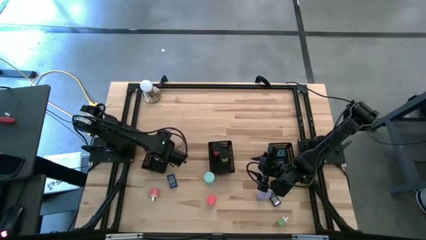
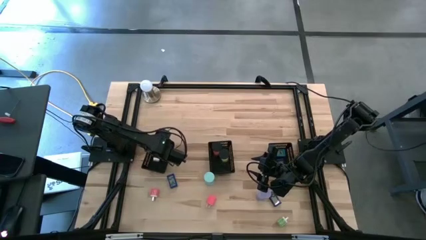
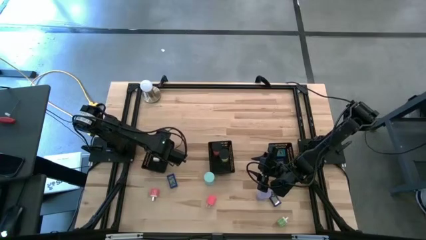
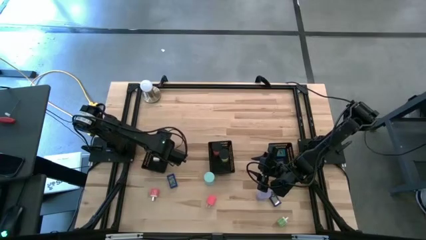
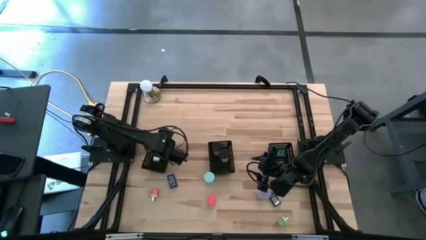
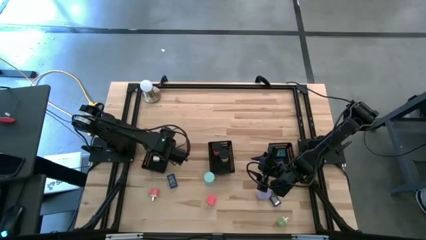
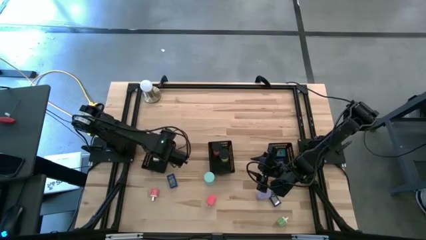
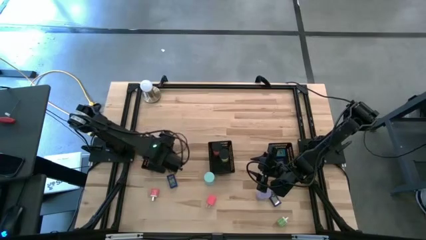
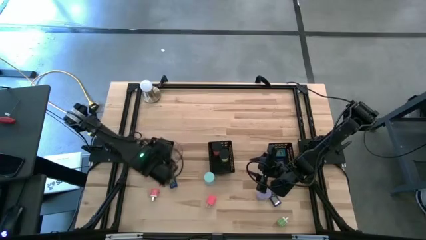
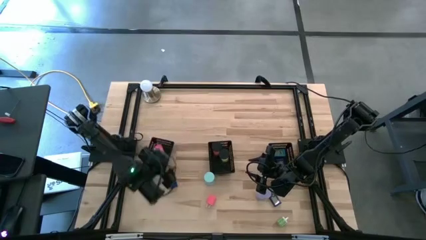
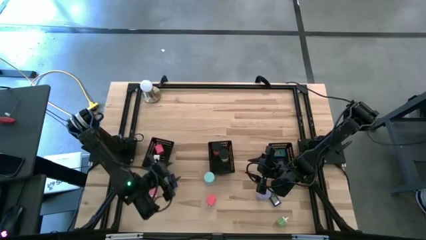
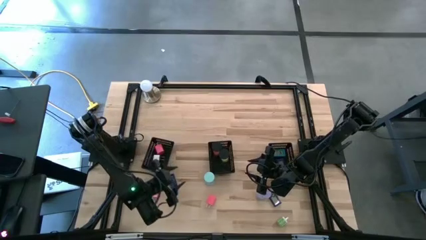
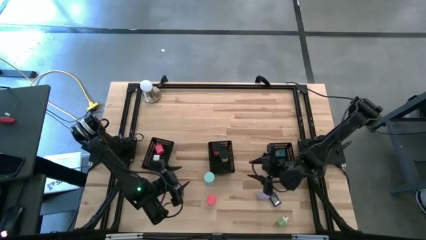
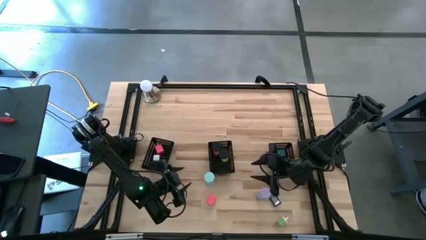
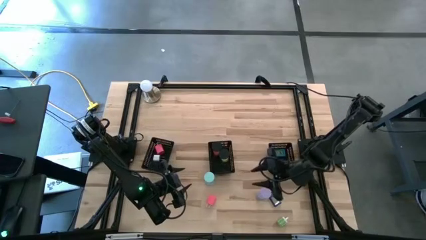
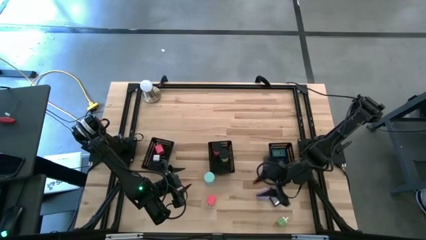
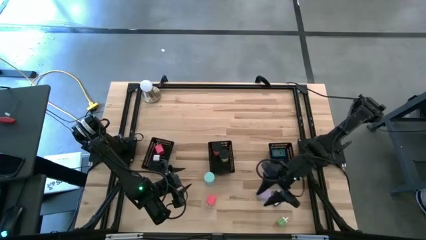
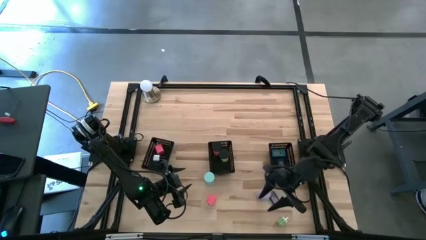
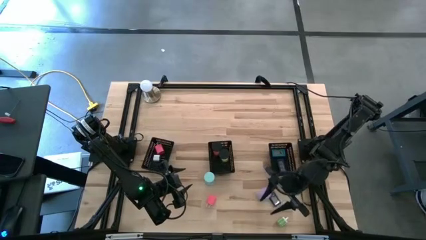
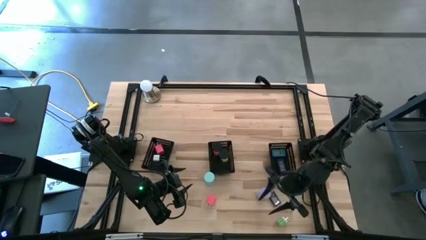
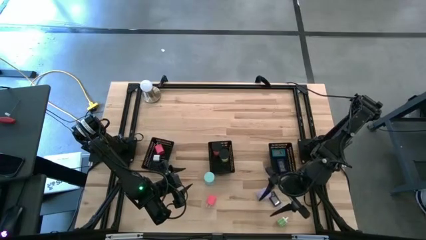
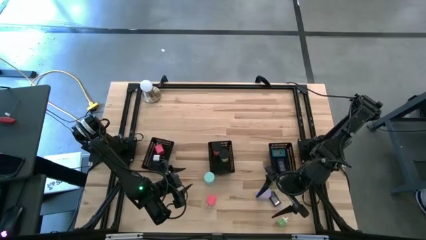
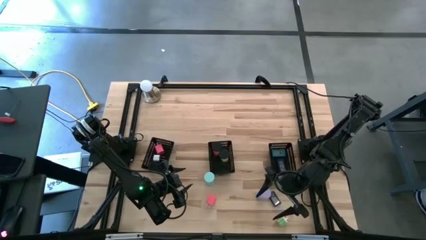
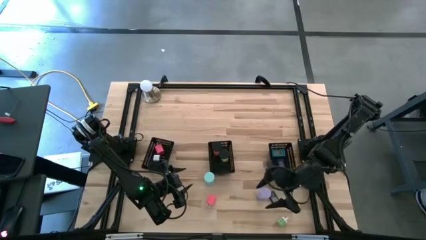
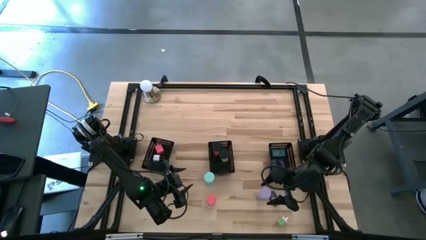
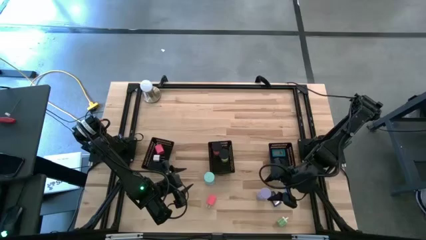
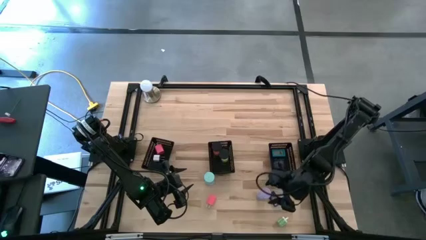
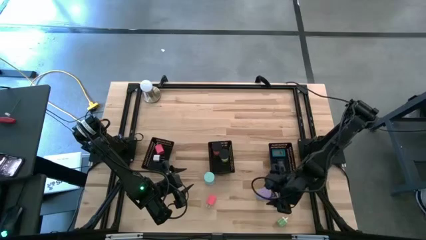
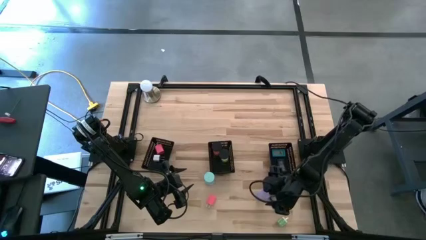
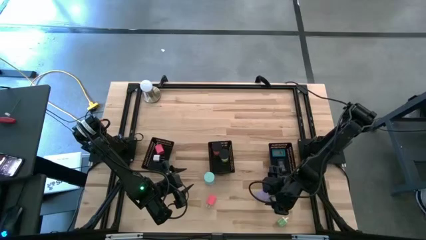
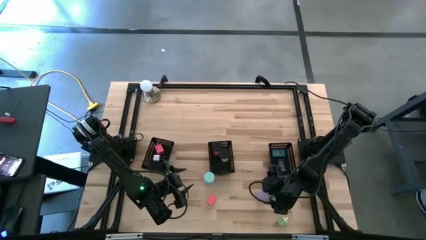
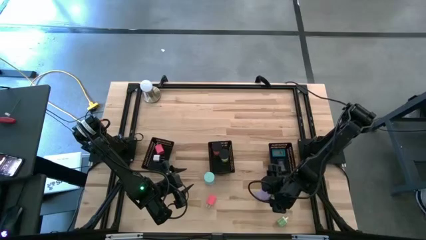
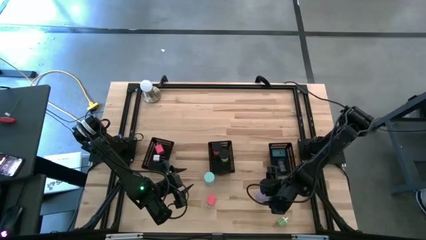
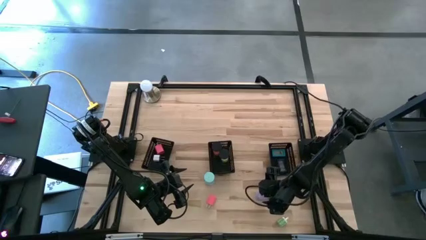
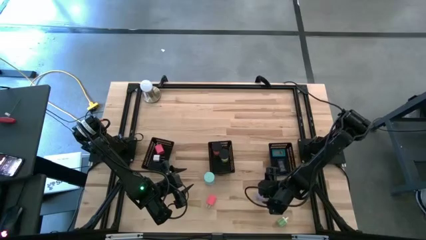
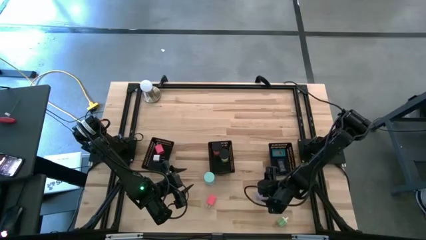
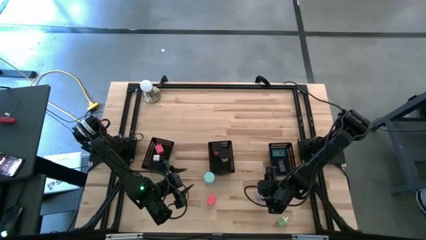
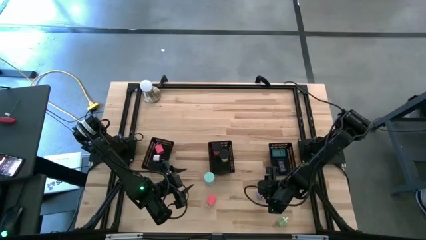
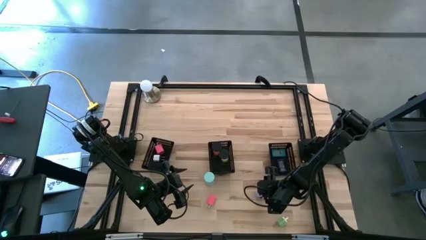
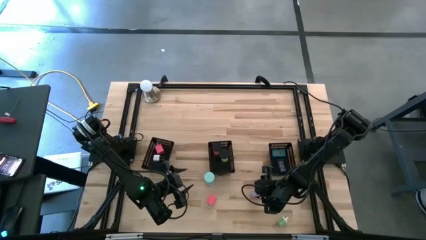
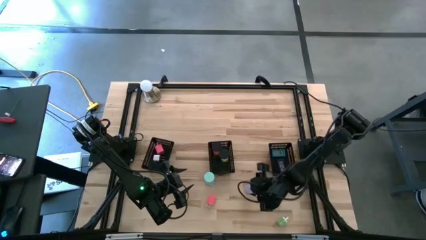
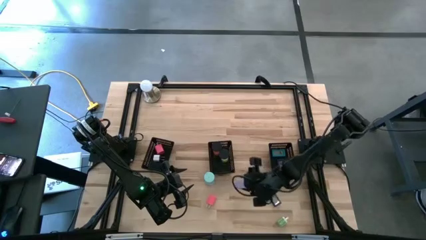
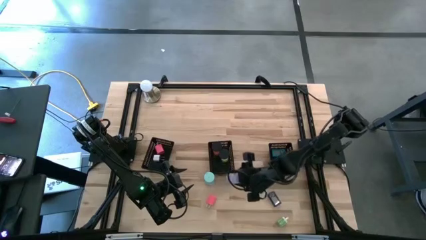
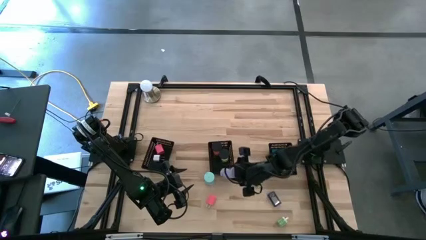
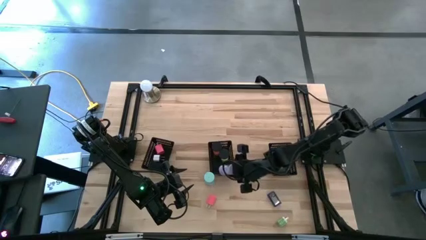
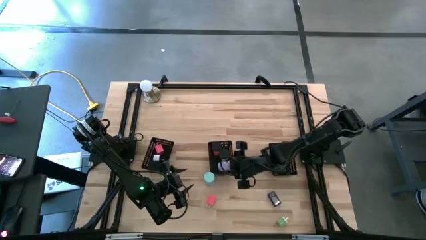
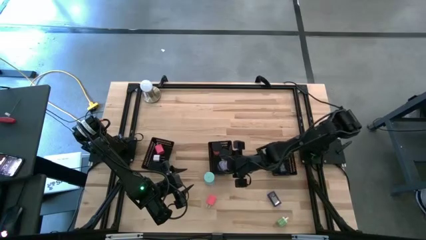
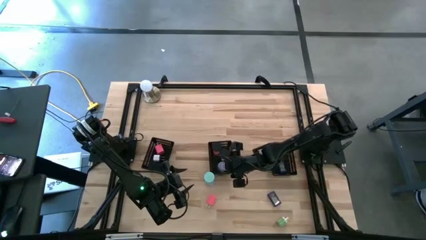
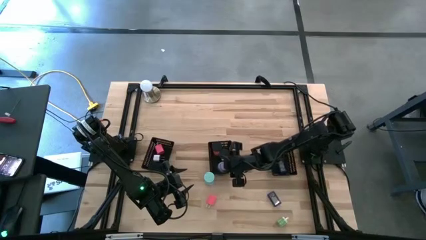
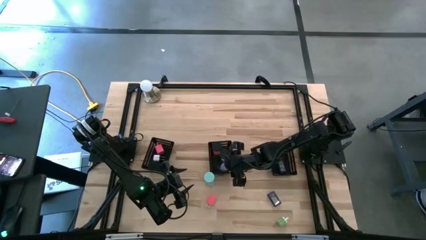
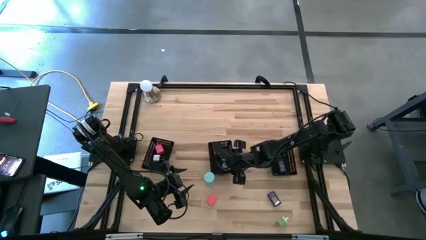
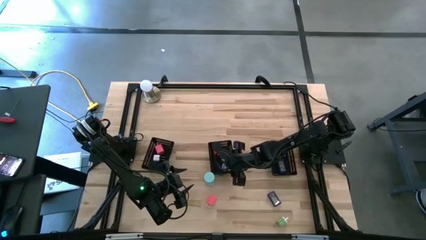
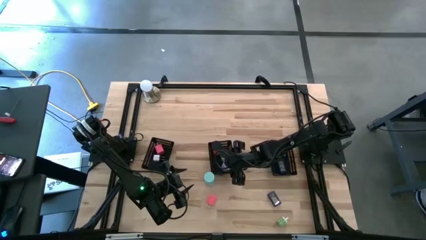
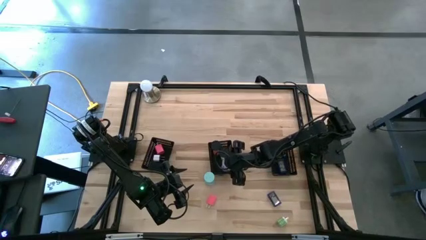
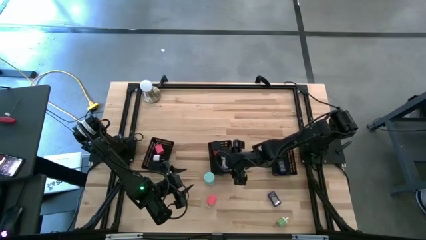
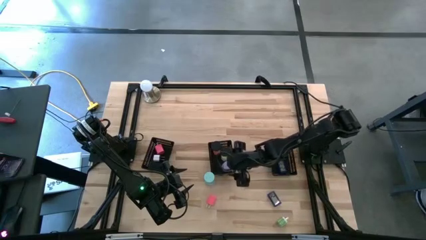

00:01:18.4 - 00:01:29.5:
Task: Pick & Place Office items
Put the purple hourglass into the middle black bin

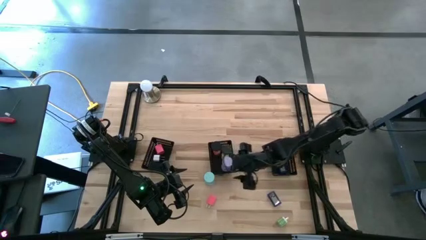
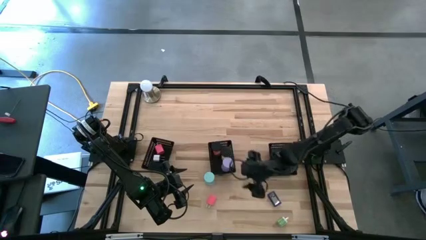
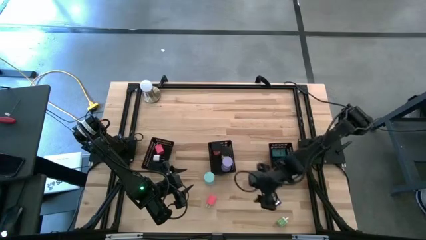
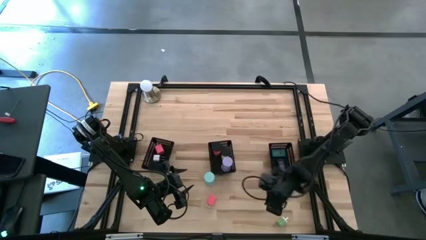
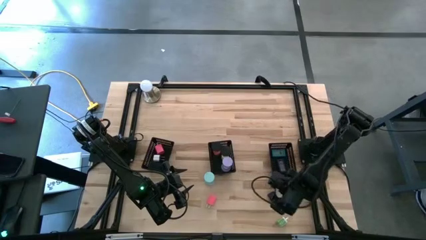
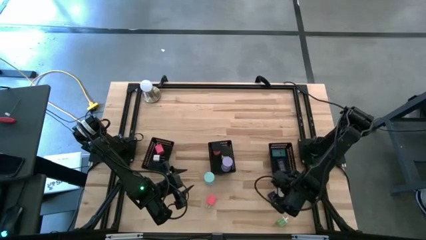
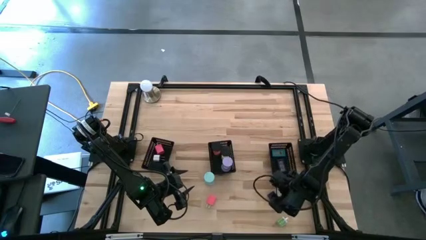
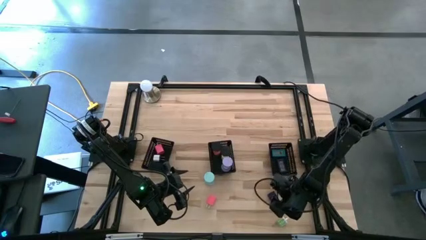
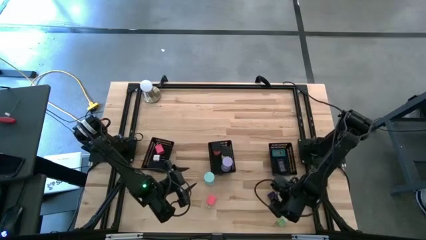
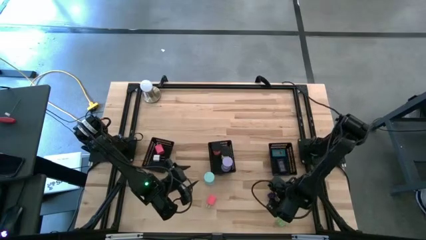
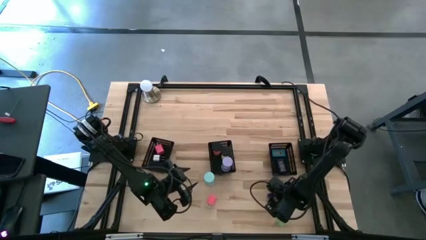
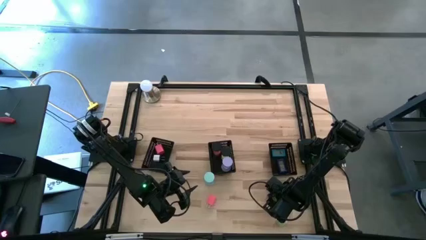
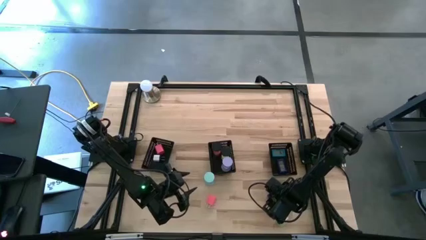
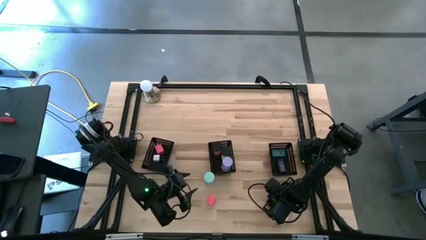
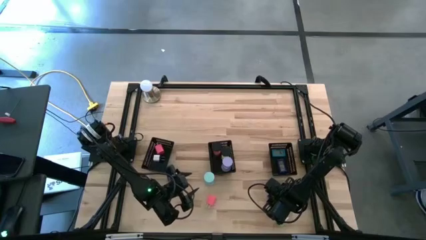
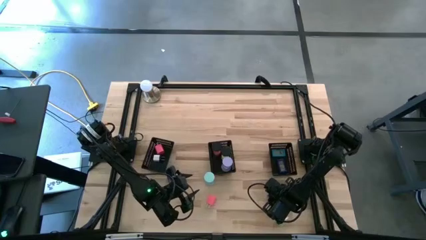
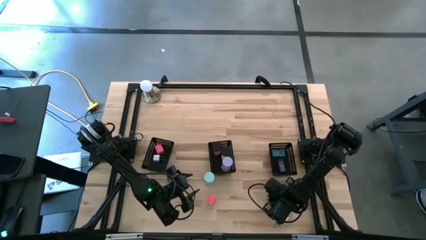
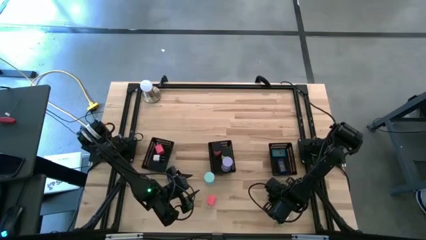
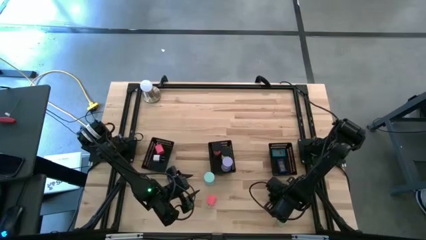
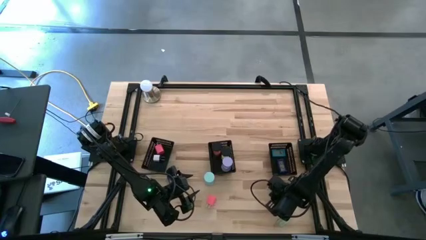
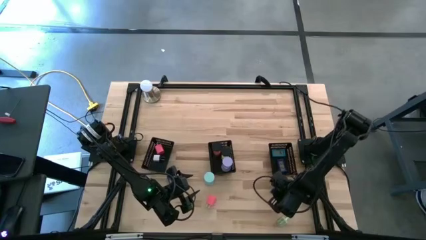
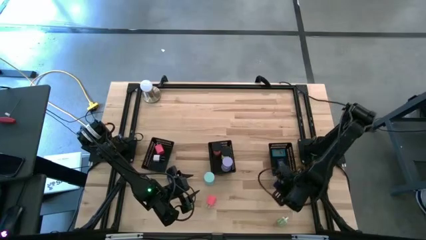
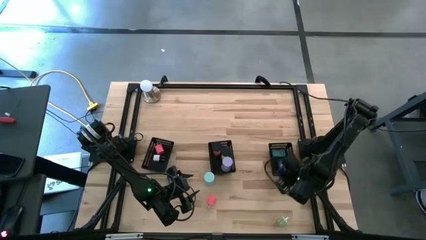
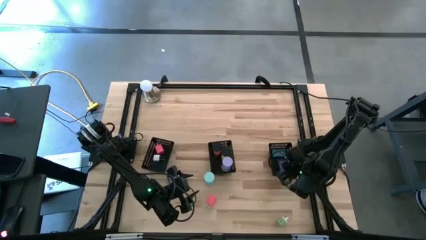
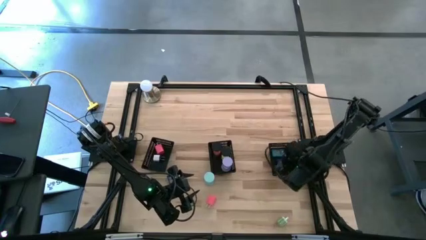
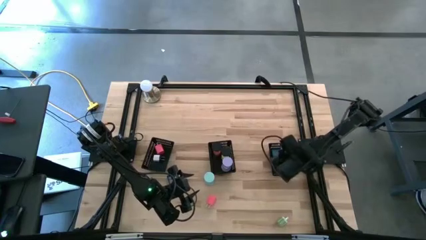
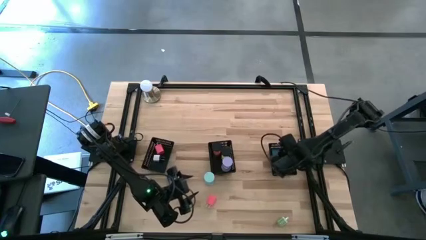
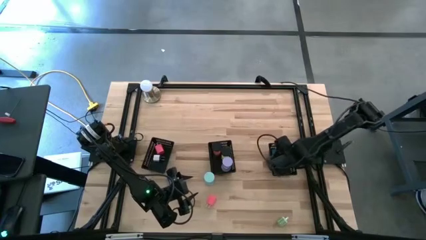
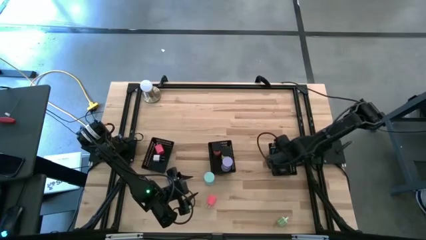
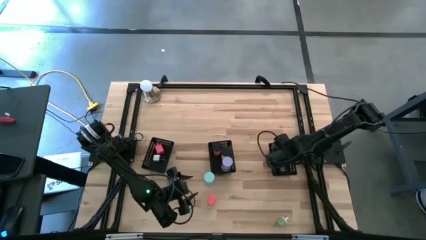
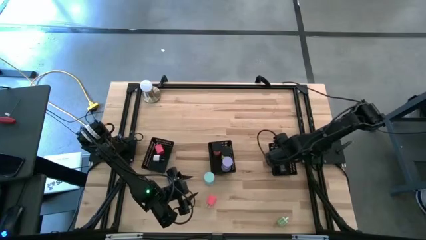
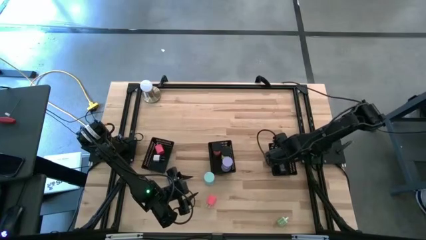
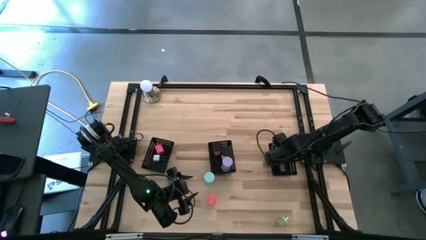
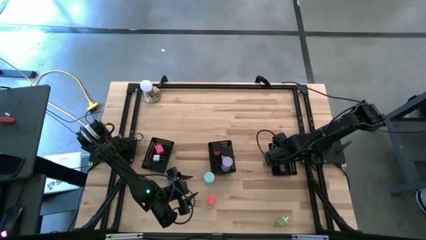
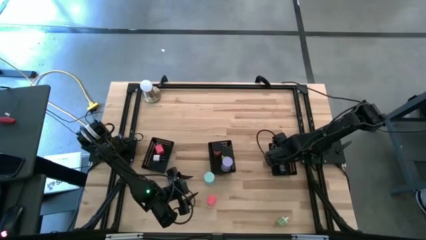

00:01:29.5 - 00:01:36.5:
Put the right blue digital clock into the right black bin
